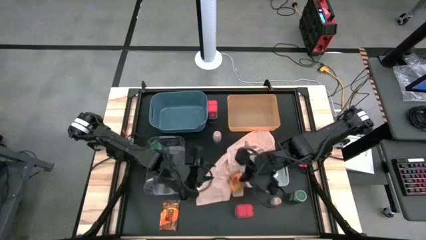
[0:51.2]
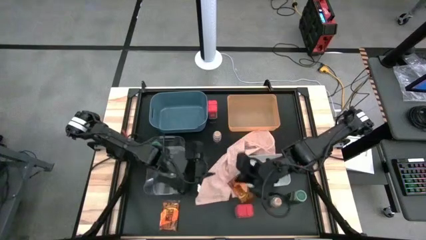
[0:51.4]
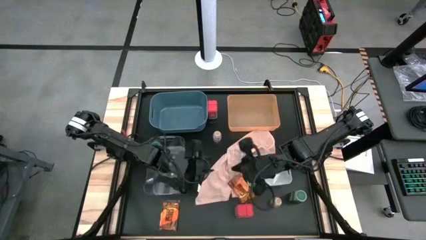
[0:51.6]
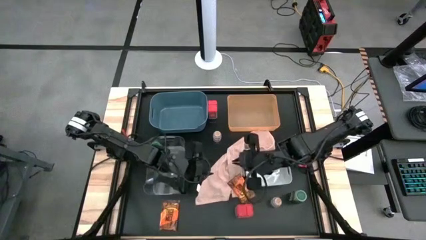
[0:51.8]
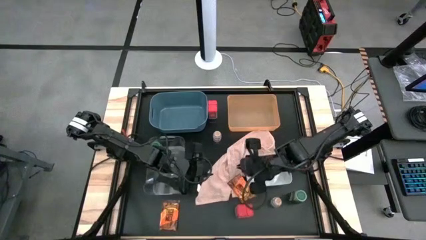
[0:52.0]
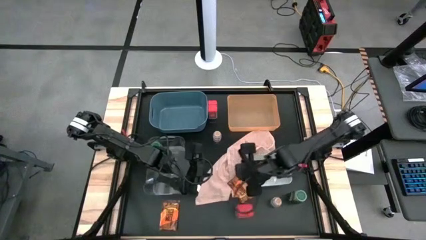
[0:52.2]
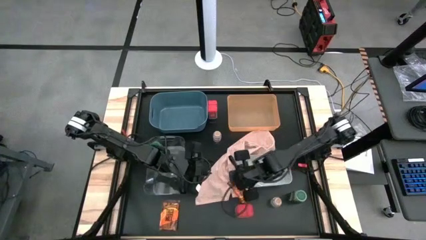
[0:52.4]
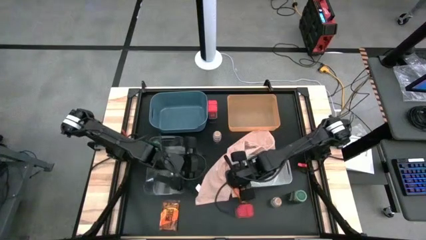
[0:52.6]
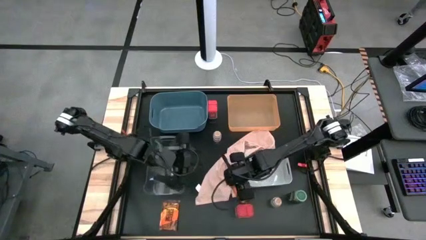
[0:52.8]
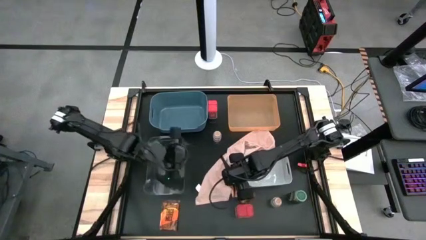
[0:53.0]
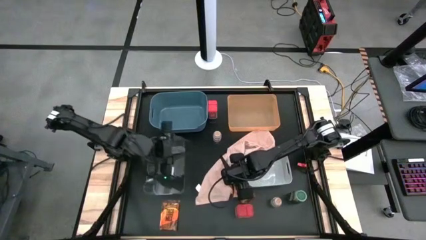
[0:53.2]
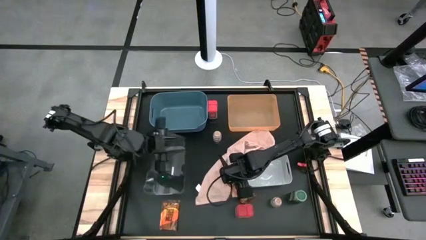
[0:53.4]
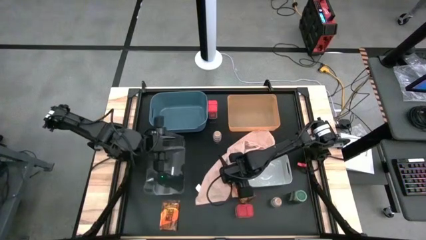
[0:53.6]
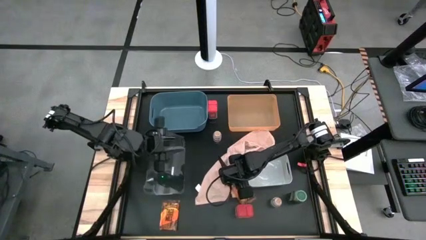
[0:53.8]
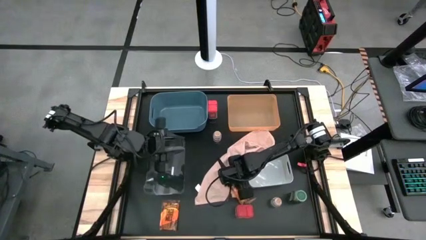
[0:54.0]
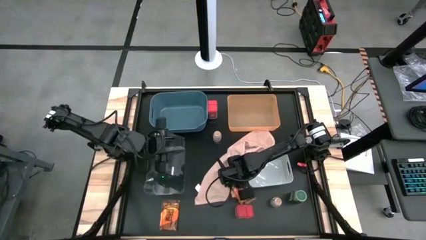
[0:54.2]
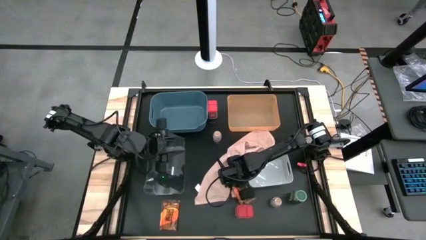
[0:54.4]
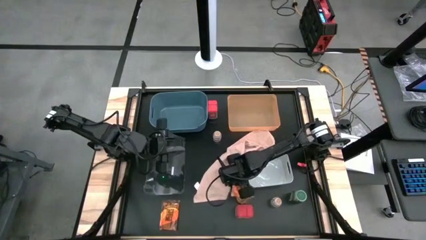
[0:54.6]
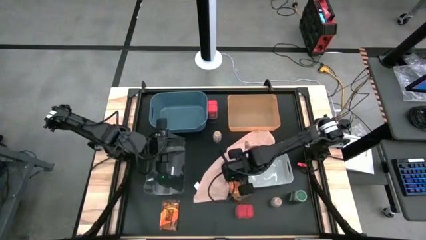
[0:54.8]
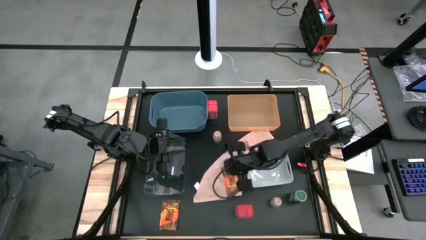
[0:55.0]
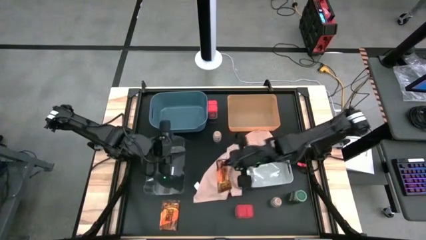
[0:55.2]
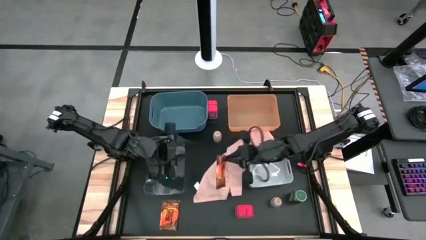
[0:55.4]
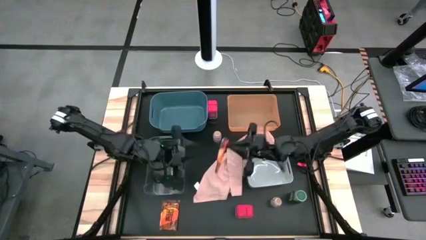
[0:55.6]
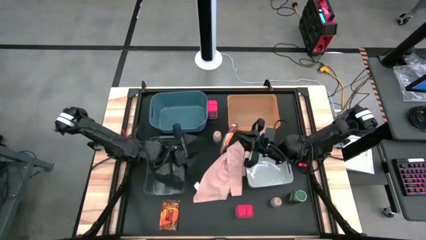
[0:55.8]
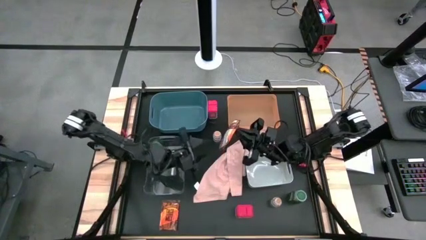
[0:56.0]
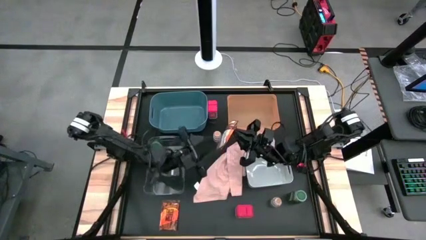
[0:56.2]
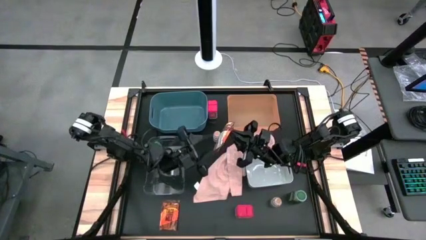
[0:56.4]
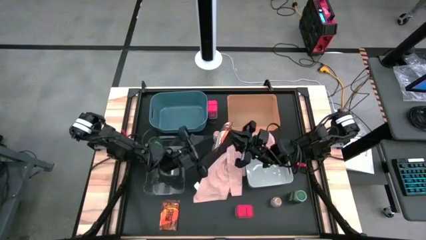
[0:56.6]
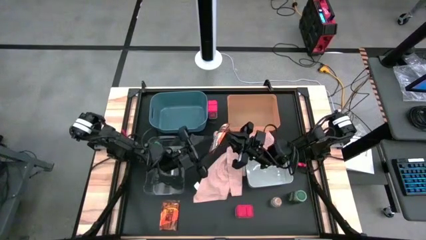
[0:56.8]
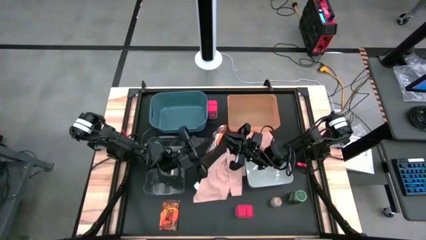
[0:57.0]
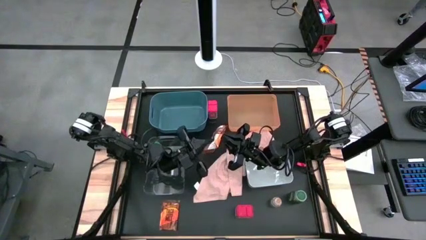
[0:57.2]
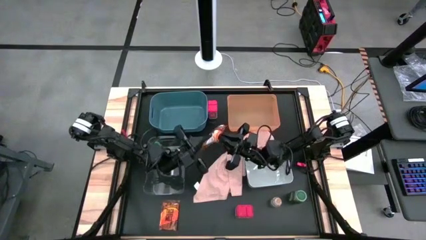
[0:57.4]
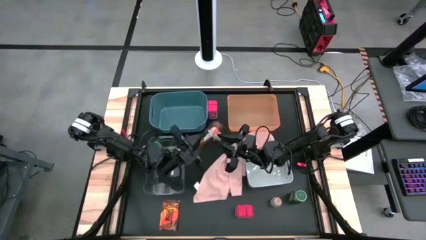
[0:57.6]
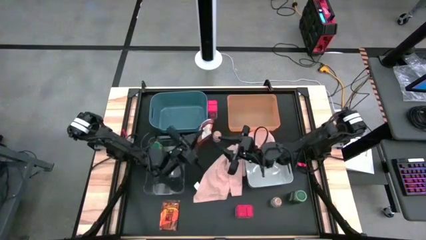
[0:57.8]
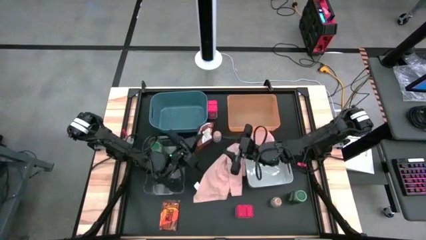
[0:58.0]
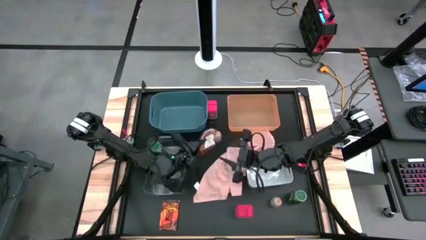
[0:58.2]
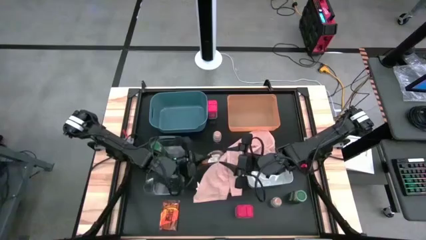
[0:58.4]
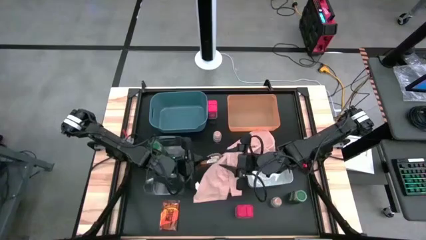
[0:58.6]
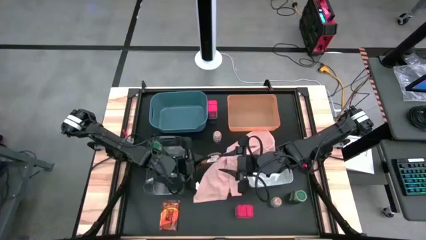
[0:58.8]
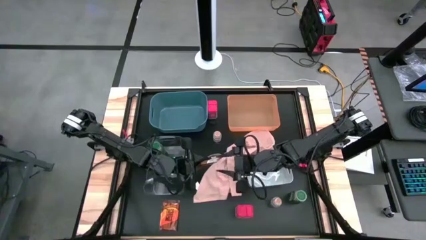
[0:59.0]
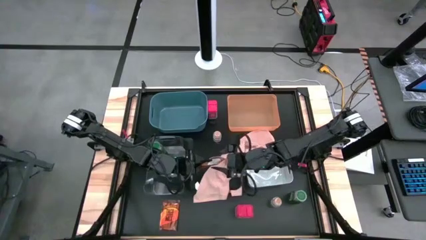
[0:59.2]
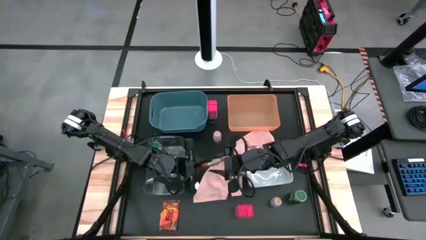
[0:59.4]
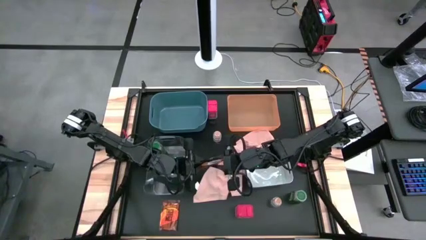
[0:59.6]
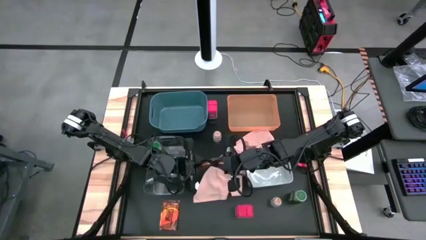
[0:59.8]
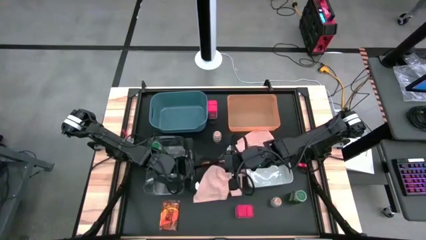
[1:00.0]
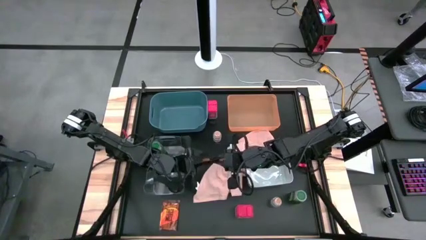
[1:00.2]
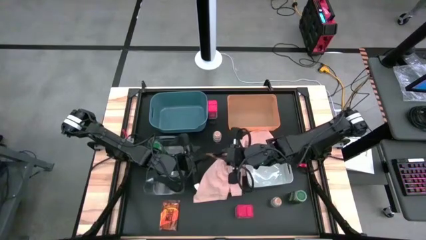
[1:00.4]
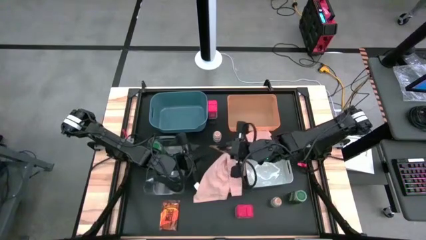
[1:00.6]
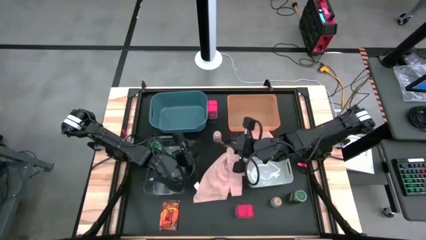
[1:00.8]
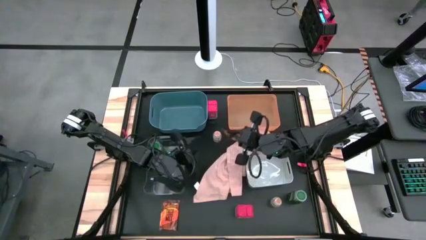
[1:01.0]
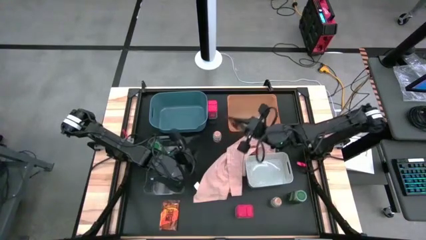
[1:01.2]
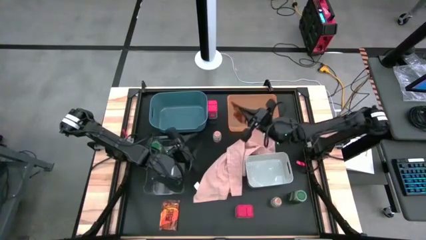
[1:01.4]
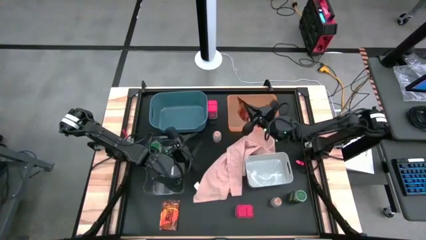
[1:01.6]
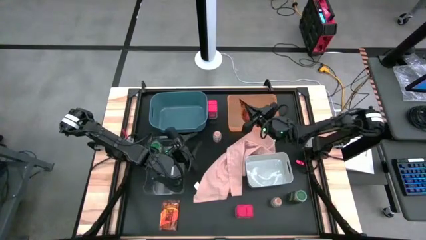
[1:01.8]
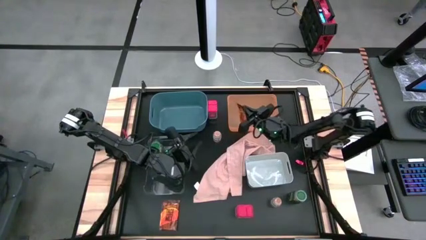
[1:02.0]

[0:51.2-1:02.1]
Task: Sort spices by type
Put the top orange seasoning bag into the orange bin

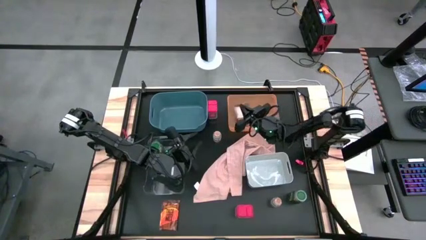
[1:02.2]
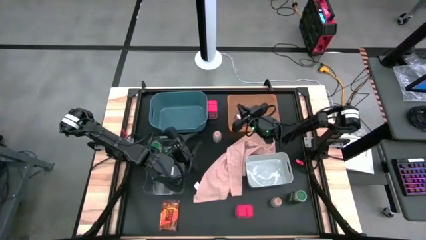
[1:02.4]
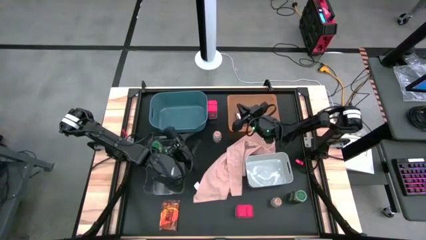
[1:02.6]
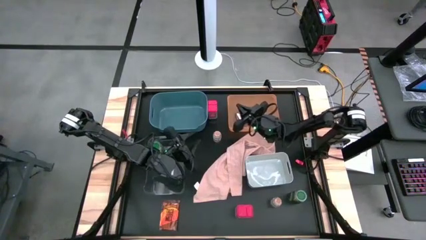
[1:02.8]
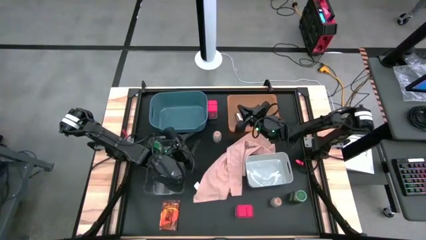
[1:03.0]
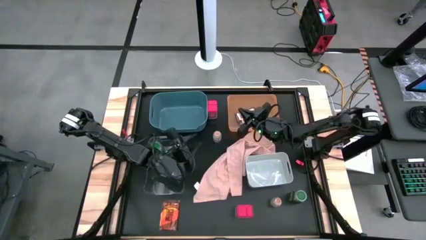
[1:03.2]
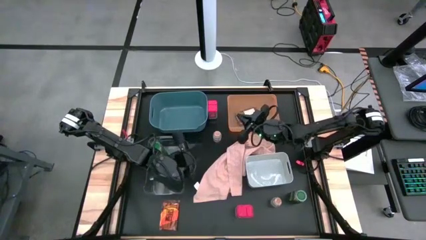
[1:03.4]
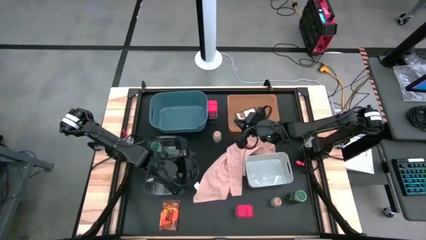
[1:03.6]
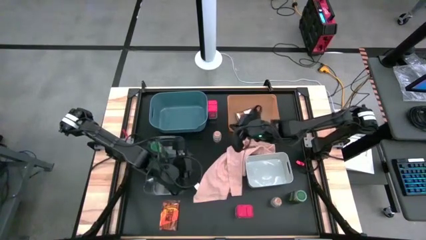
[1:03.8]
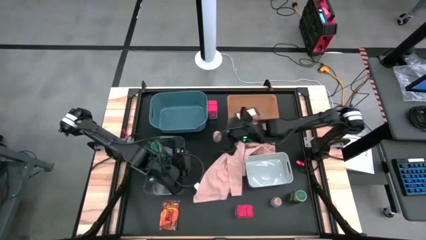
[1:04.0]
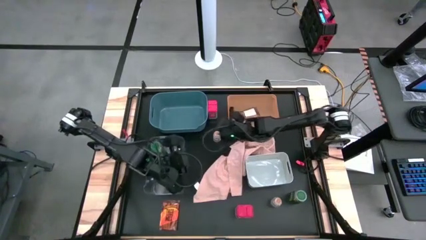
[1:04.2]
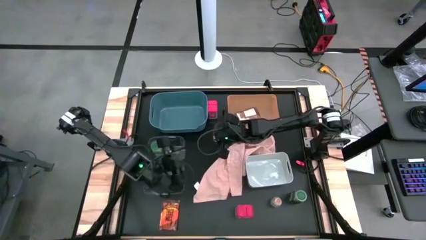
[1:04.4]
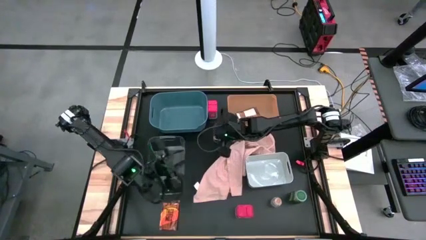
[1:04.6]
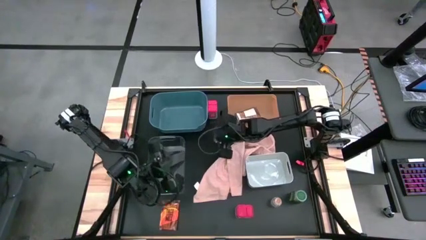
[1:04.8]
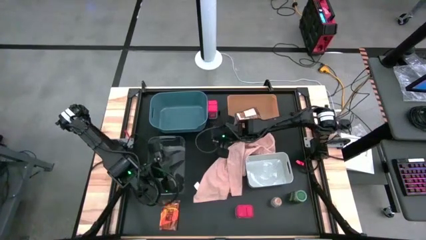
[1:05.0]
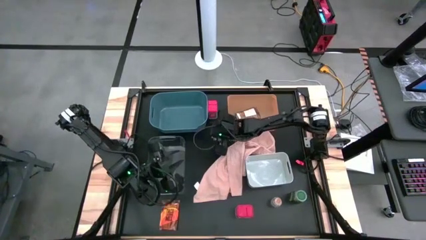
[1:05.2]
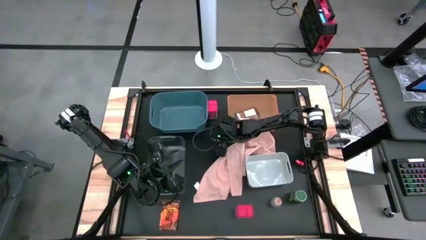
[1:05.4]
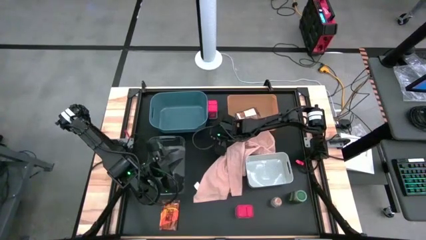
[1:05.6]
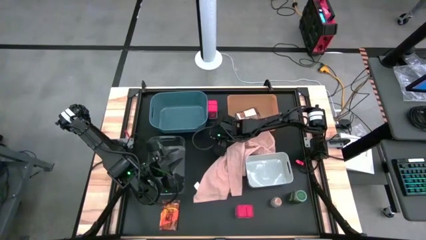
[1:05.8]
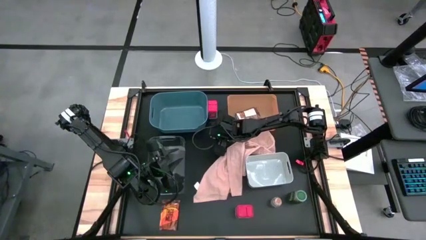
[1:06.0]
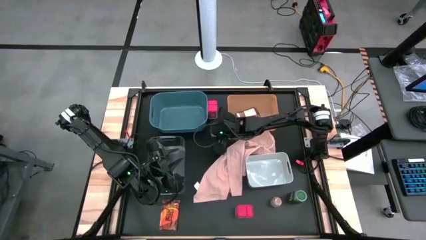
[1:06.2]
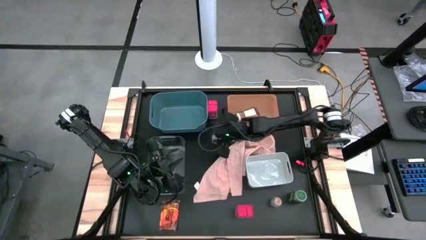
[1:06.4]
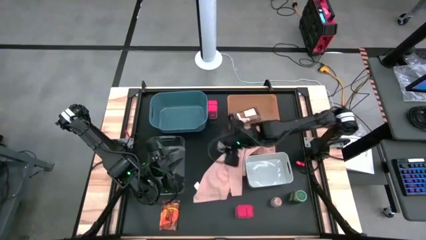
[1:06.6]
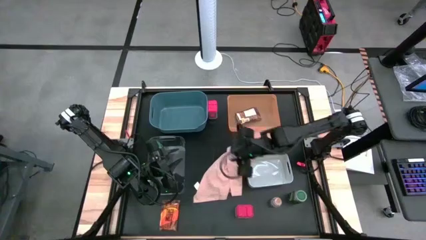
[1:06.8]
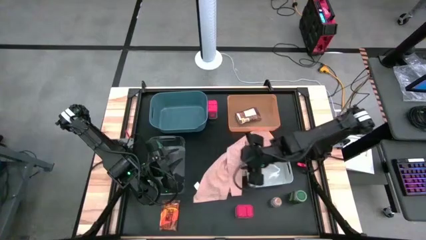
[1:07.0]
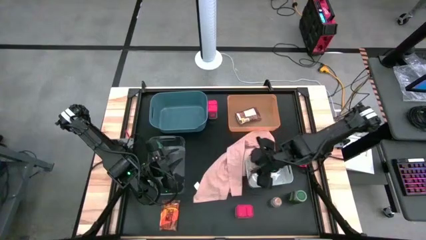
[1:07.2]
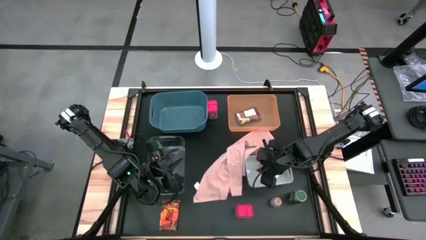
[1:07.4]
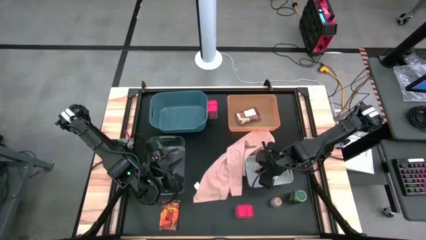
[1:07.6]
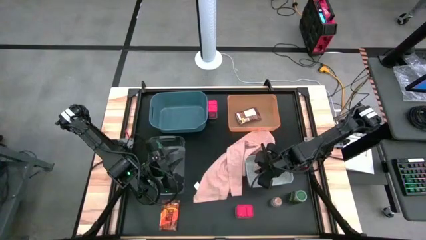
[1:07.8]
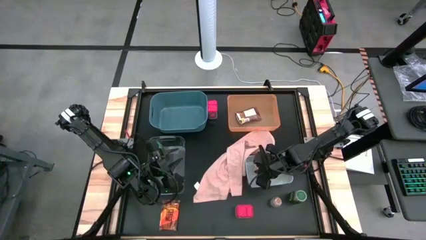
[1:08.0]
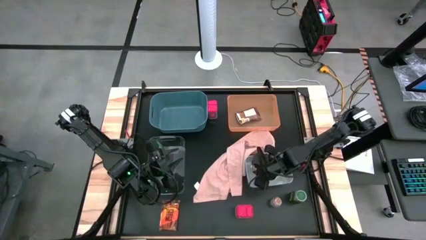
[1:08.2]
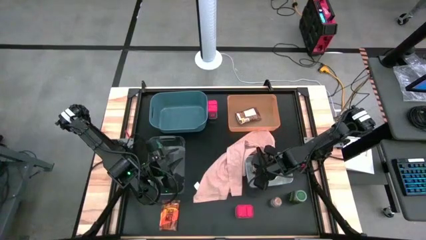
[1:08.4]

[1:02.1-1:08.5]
Put the top brown seasoning bottle into the white bin
